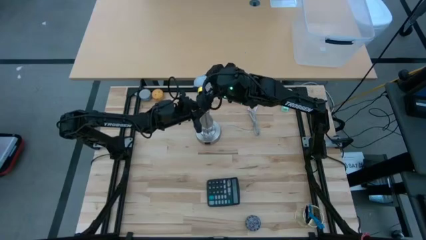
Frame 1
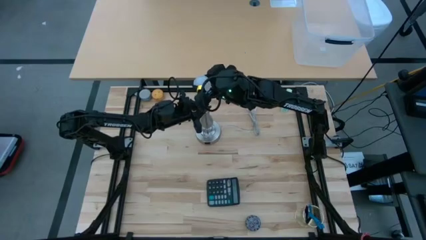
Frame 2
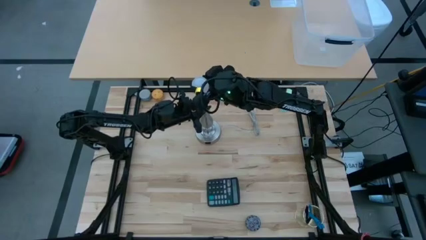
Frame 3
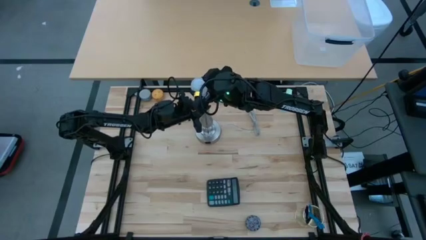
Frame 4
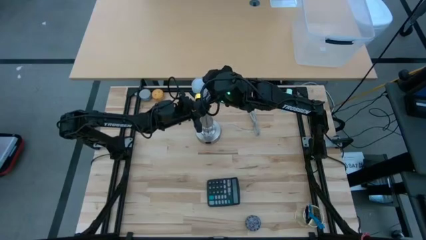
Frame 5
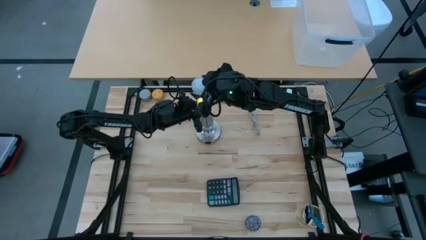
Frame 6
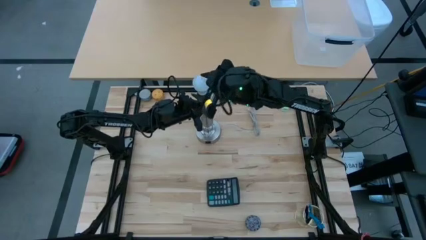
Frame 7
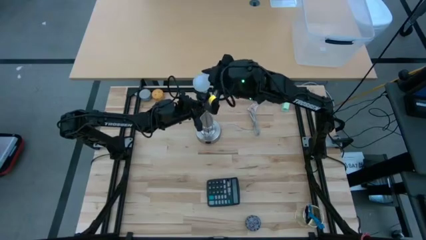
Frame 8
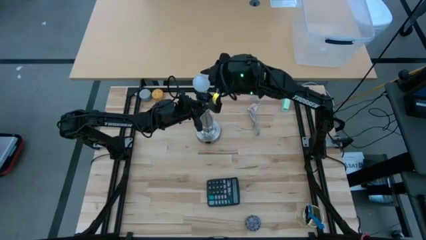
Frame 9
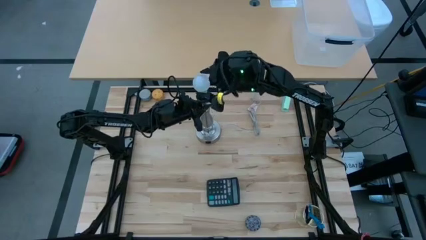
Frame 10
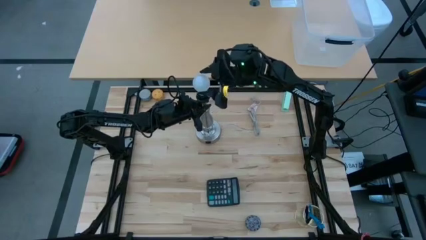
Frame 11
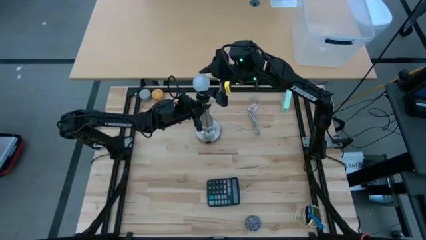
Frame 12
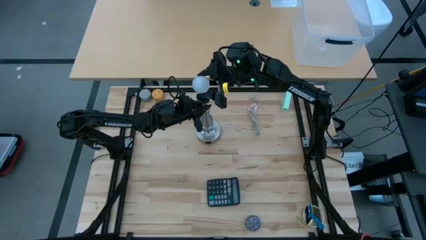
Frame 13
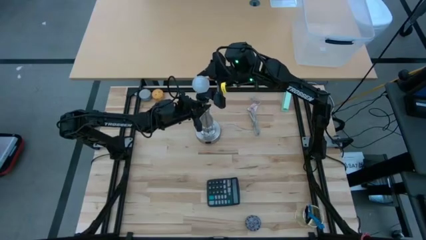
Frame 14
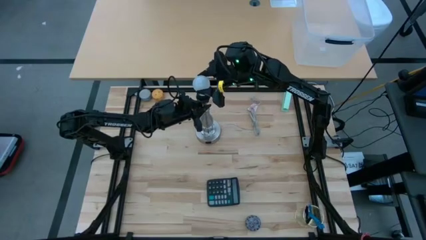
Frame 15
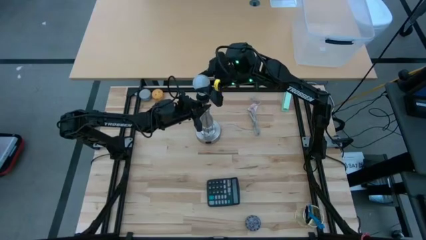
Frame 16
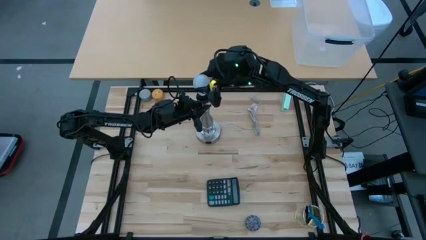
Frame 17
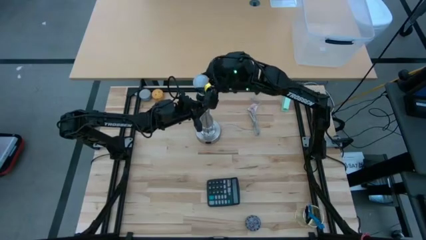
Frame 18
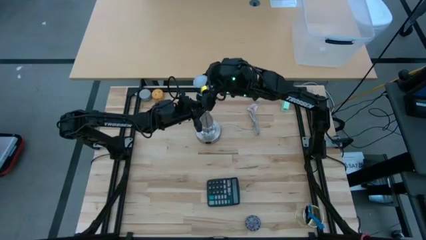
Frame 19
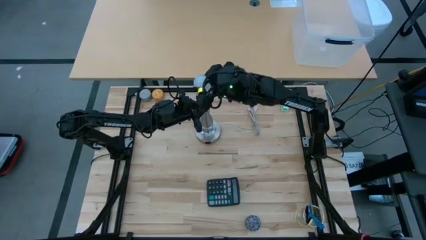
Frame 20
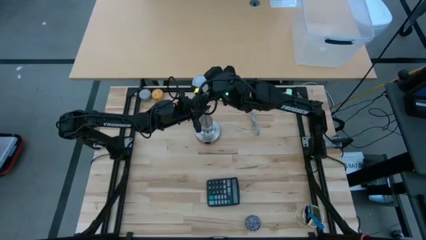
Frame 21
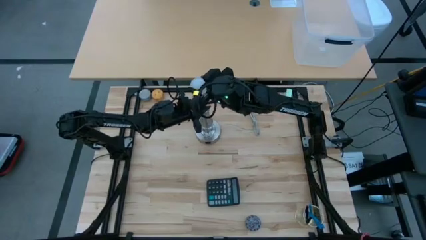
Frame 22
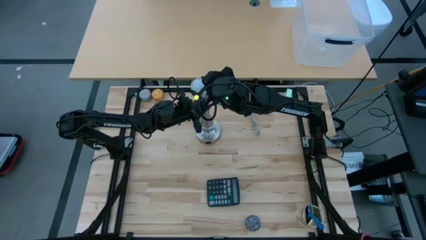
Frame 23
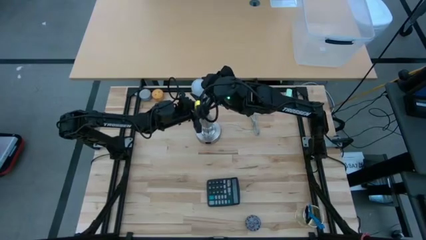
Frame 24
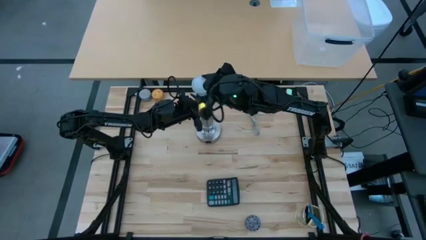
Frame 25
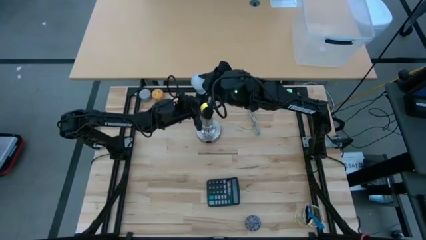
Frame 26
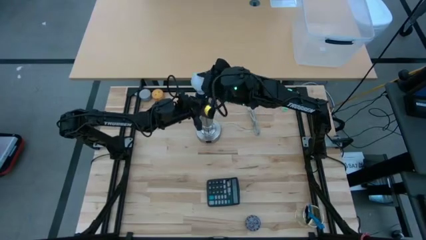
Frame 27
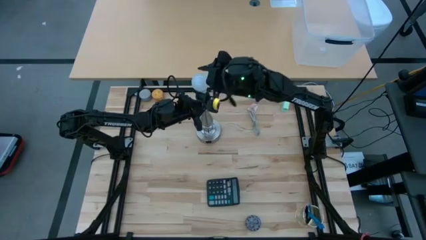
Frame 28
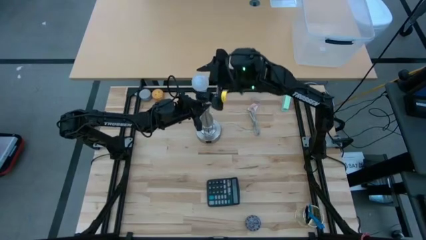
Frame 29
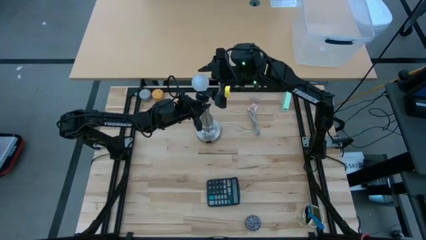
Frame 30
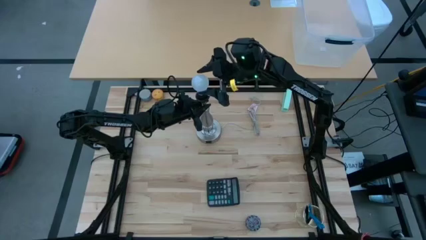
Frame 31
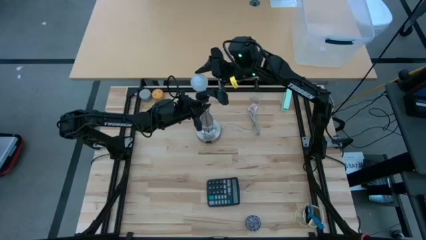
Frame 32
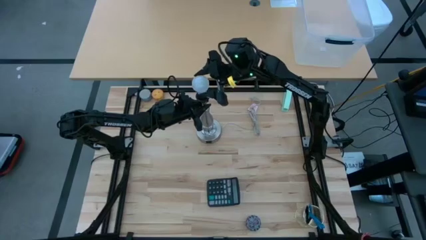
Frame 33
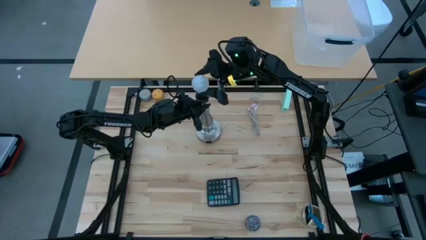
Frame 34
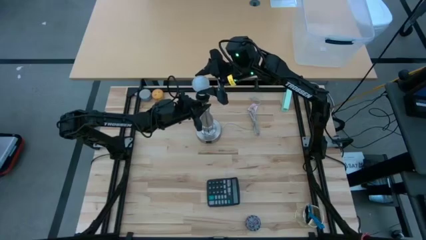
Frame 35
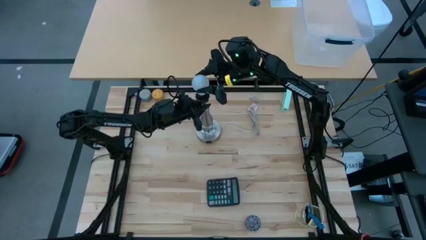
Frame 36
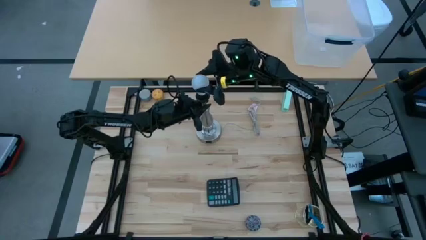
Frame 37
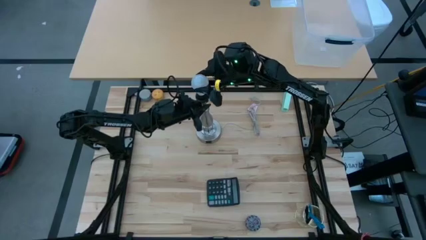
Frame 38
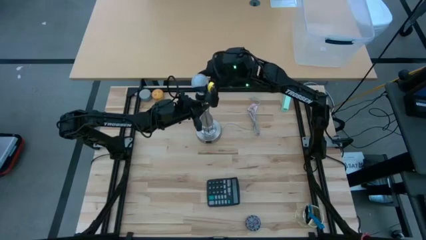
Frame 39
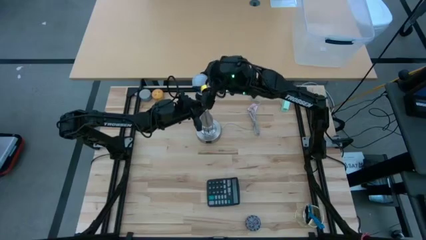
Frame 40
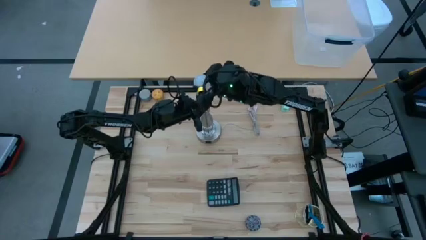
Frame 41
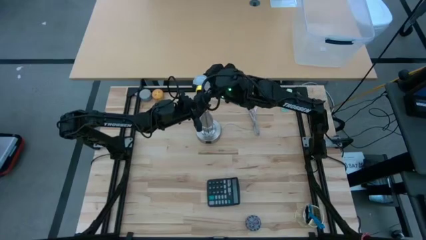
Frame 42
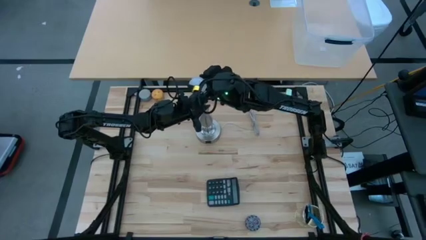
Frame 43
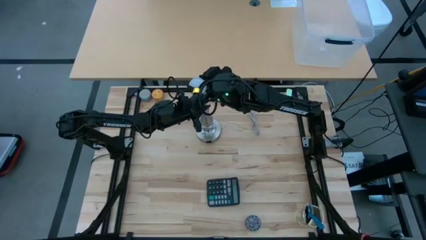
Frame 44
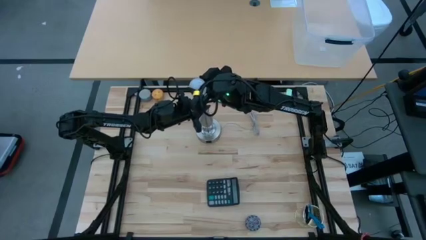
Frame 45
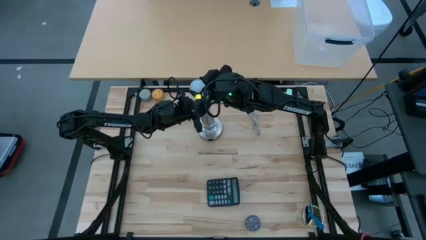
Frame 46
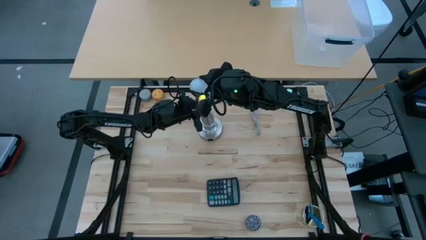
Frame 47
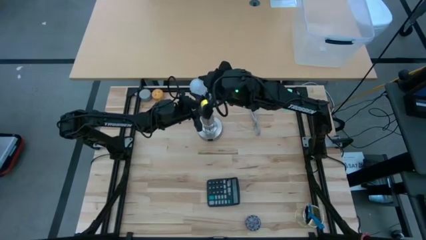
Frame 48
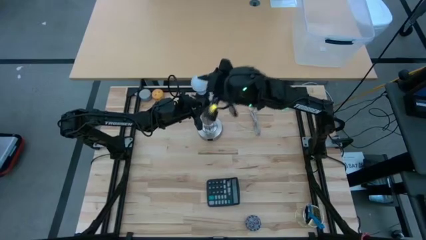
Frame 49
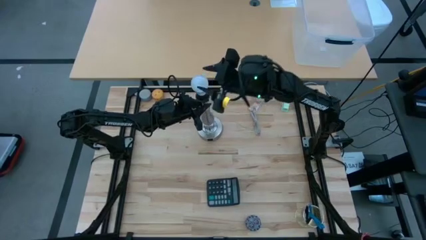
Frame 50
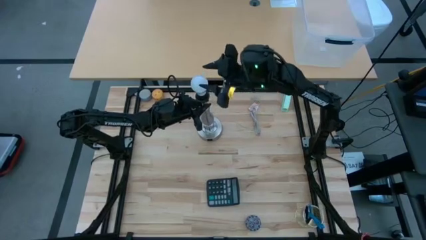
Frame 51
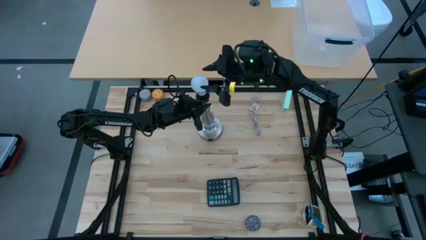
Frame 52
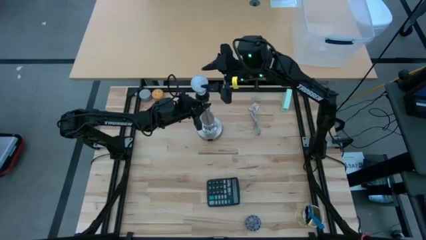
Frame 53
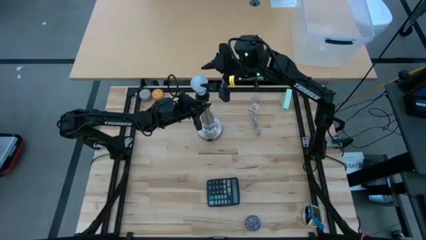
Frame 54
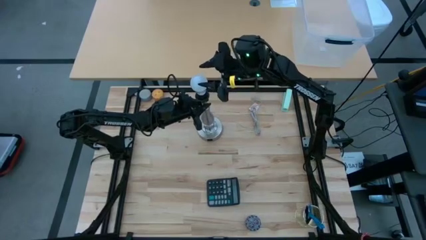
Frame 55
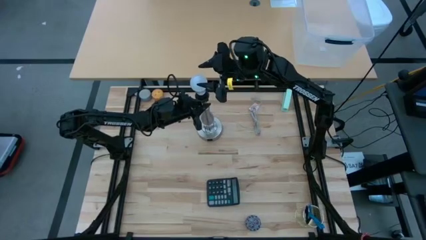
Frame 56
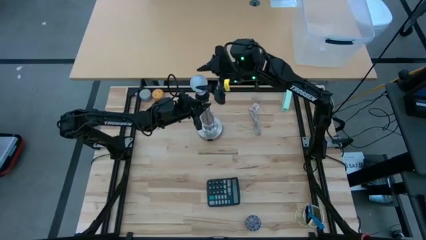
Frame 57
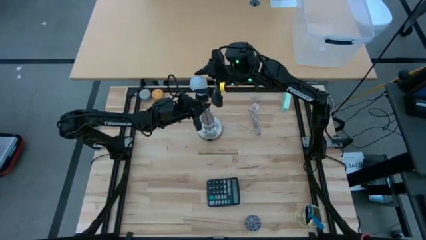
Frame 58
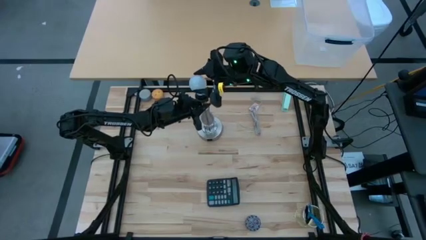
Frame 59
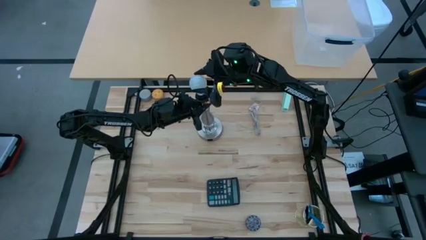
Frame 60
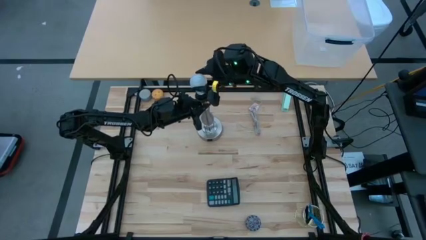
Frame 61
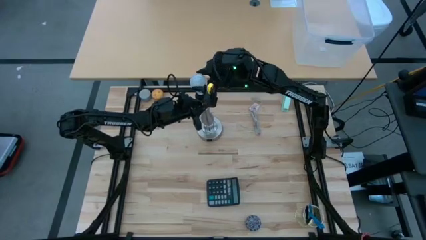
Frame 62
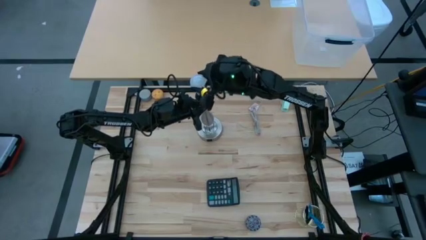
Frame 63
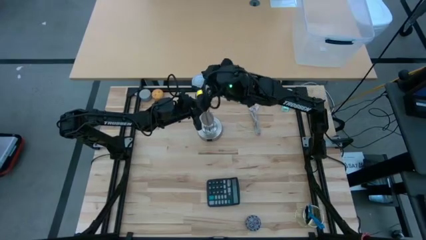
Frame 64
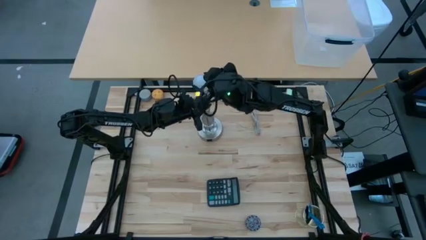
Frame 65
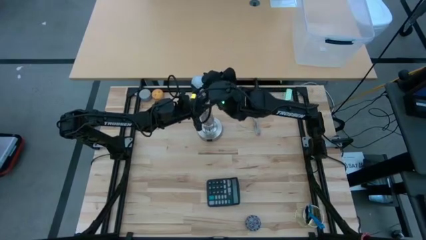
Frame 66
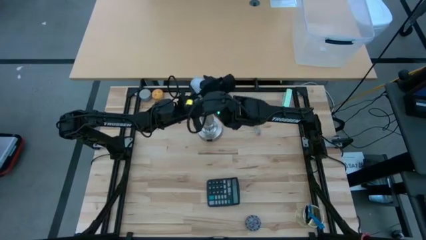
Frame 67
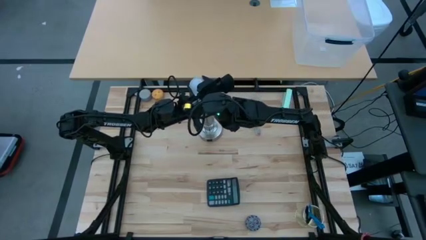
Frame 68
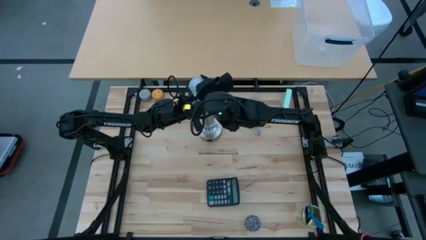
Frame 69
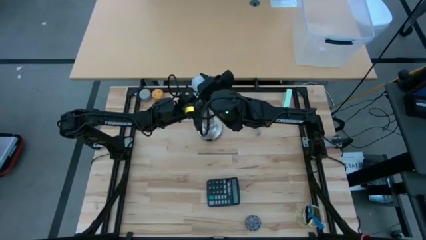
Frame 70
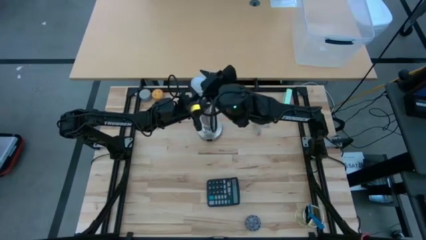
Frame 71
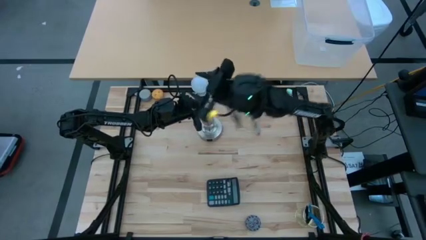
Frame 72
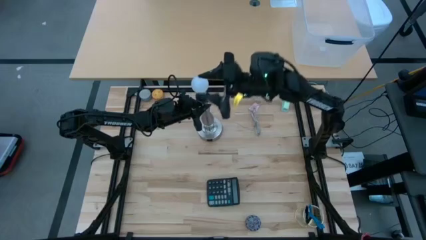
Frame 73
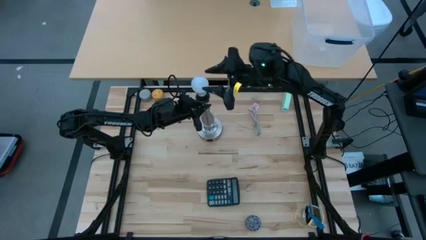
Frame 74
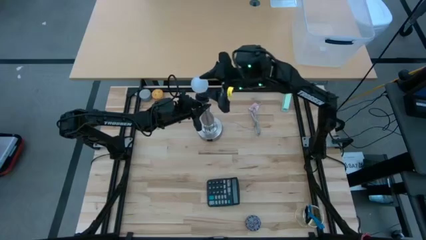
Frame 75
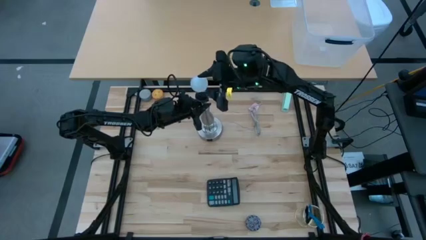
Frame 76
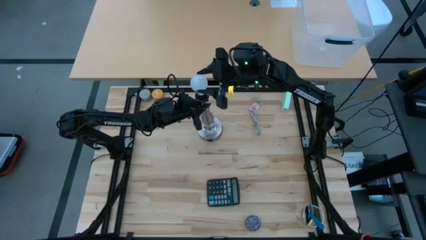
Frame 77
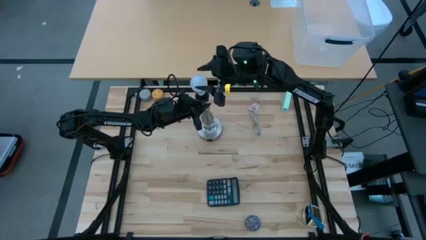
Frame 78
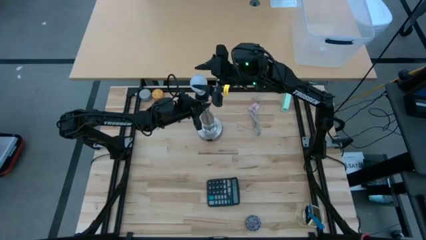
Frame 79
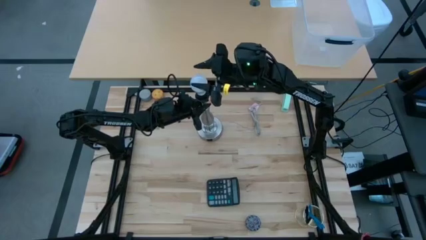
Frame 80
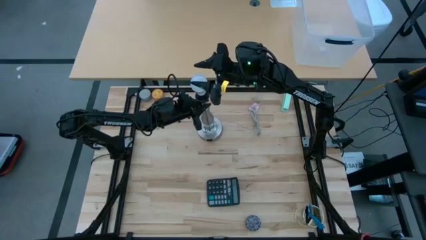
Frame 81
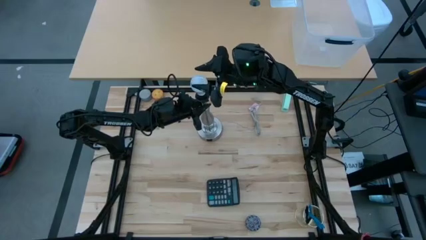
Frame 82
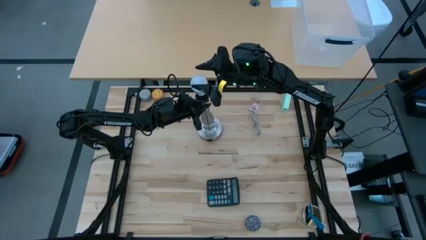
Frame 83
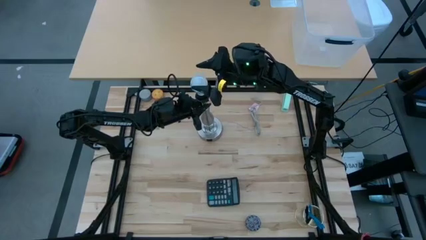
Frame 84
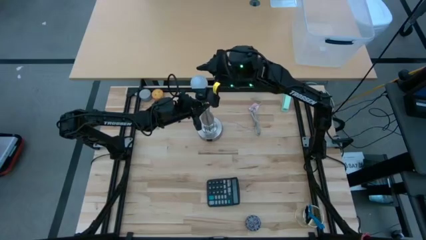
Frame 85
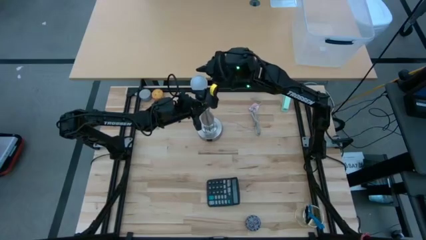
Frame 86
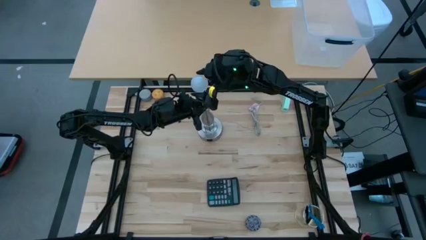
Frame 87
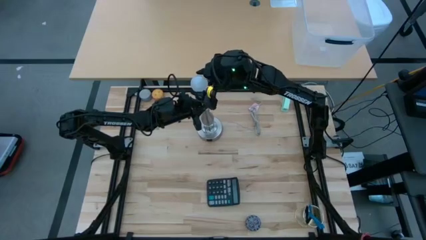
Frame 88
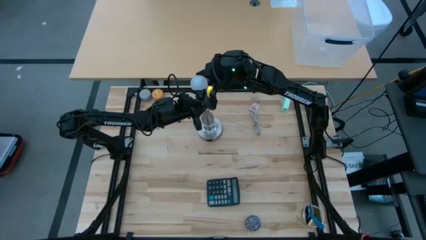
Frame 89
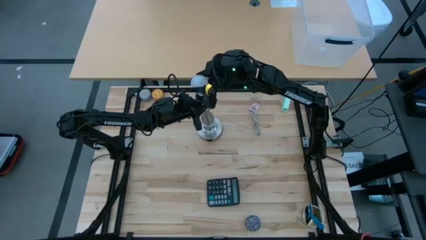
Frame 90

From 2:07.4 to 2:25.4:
Task: Screw lightbulb
Insert the light bulb into the lamp
